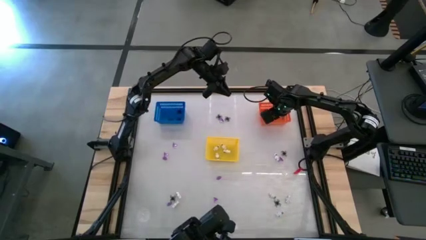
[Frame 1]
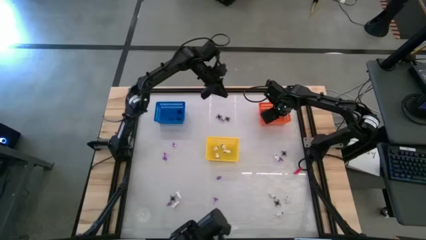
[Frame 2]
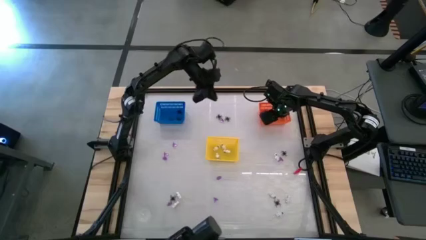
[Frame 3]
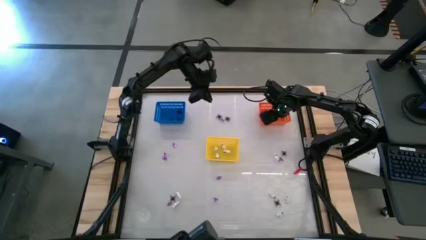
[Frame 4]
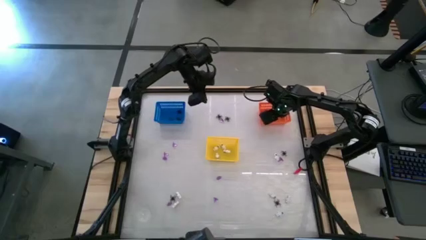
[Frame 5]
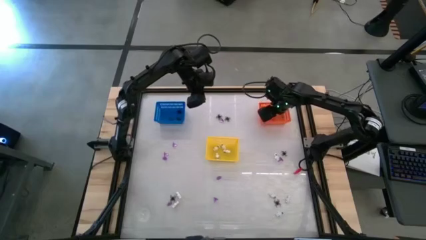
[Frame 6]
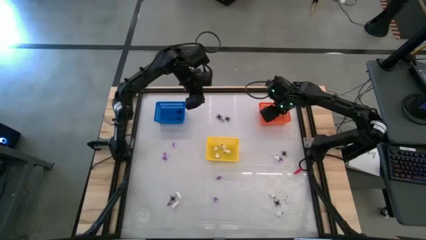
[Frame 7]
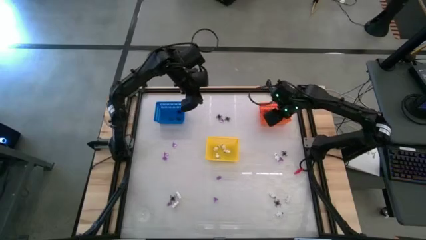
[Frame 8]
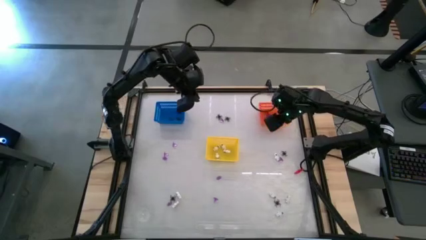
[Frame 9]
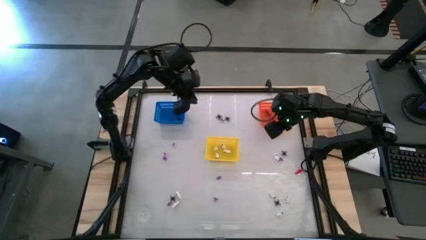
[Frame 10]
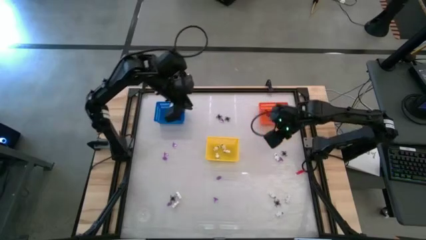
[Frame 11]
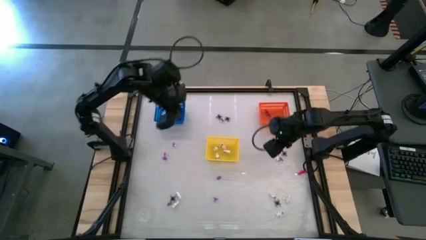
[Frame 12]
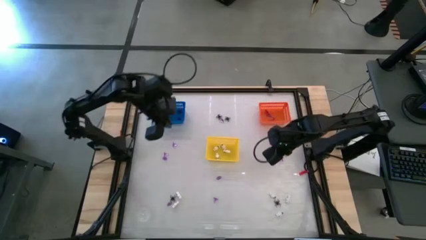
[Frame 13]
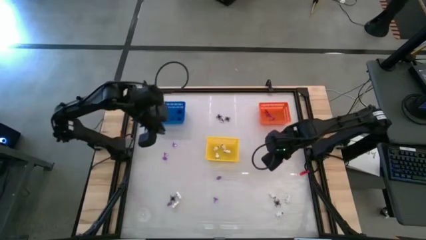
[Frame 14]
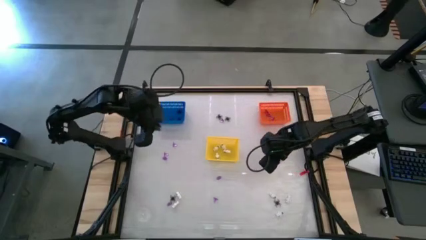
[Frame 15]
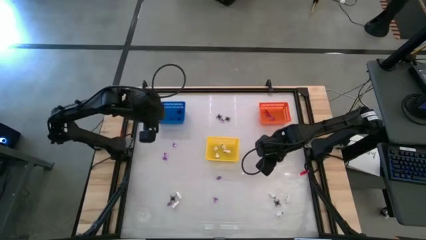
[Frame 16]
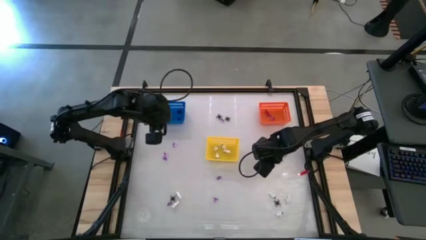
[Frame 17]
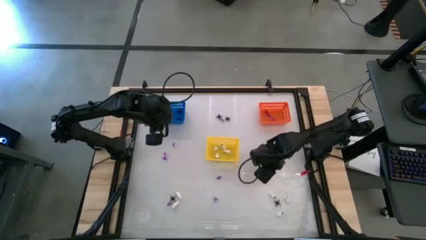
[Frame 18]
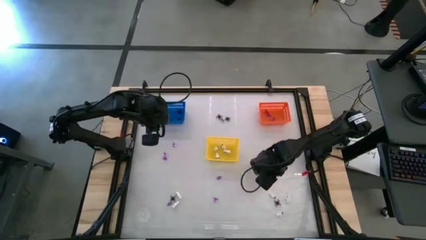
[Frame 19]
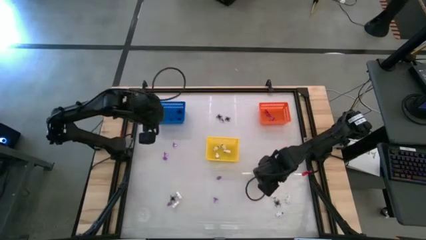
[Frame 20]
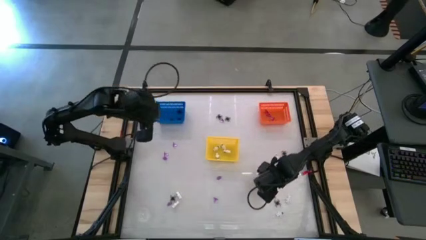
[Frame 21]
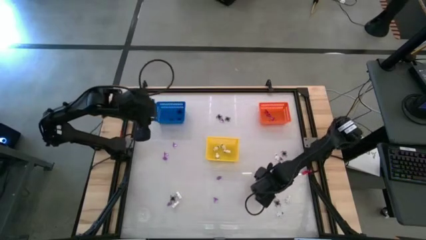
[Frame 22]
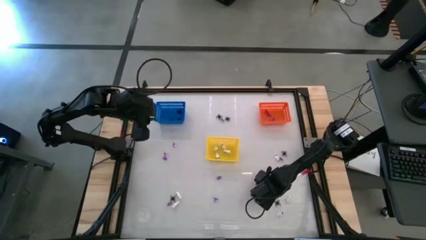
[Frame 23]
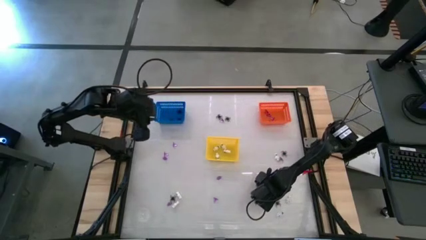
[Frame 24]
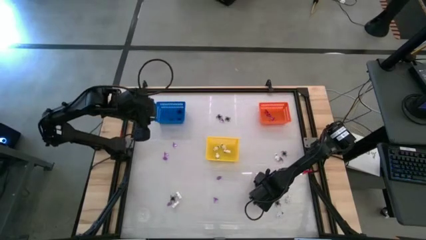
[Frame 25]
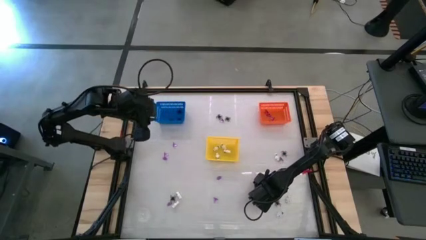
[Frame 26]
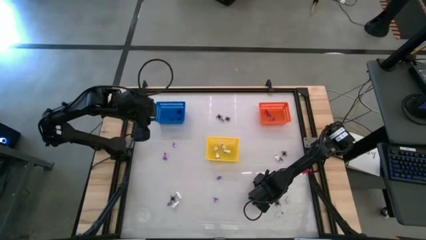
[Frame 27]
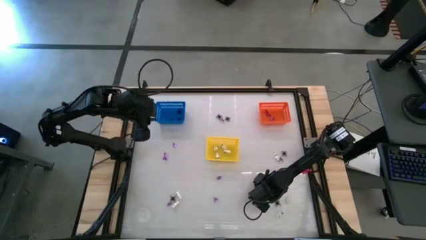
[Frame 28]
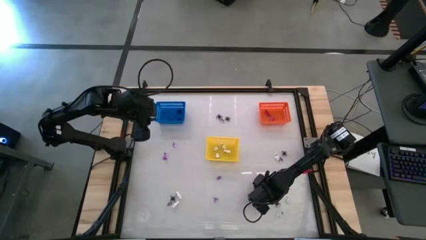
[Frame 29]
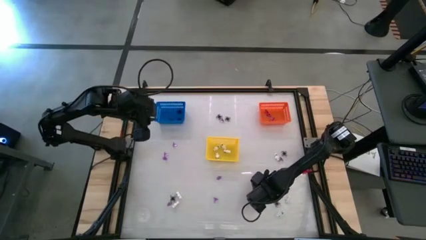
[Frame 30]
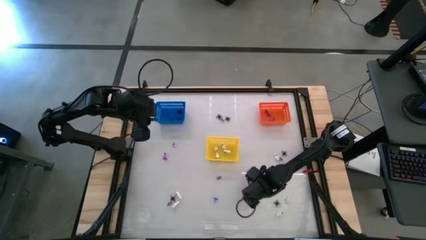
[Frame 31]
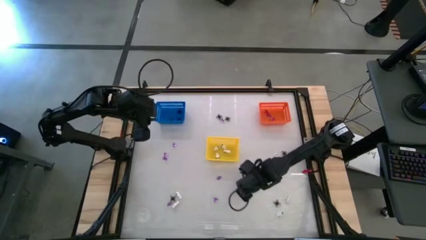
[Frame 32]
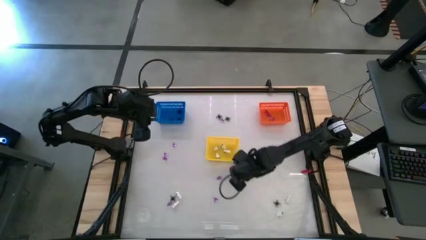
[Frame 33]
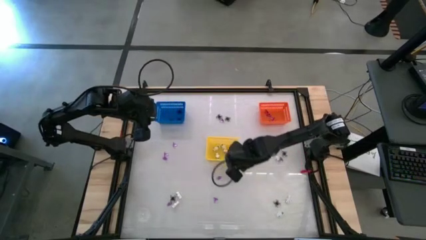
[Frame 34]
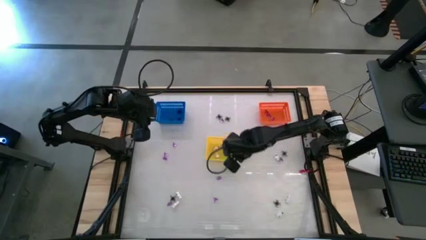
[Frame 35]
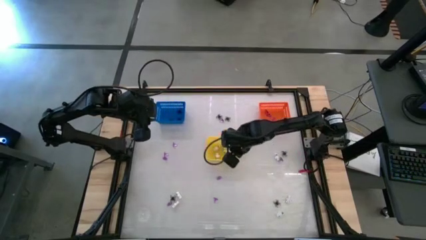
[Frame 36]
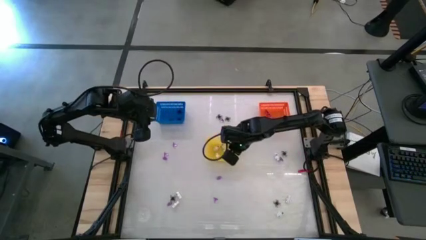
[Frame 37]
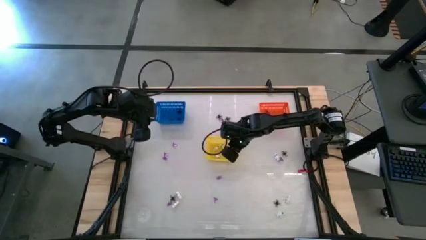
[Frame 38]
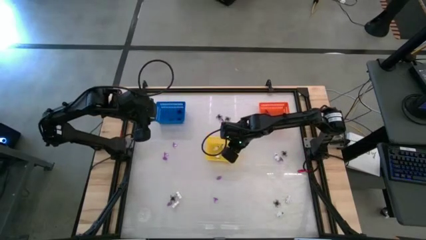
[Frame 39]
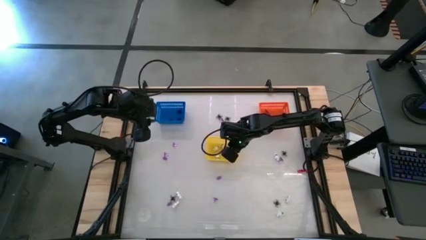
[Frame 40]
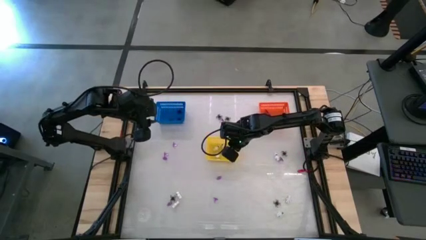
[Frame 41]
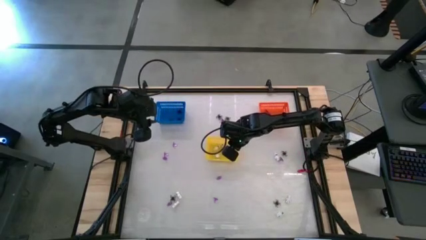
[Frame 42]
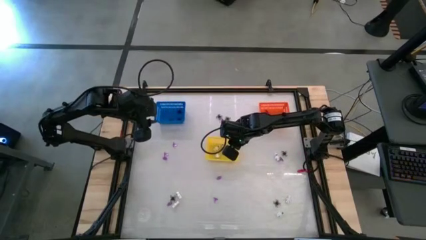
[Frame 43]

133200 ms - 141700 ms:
Task: Sort Halloween decoration
Put the white skeleton toy into the yellow bin

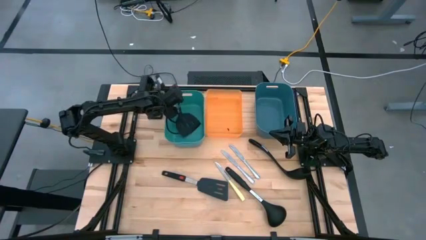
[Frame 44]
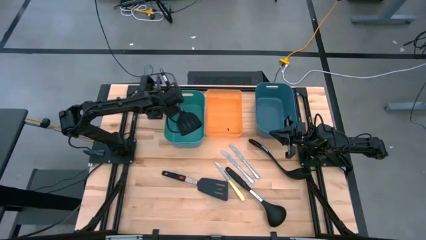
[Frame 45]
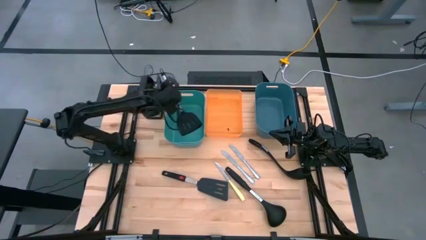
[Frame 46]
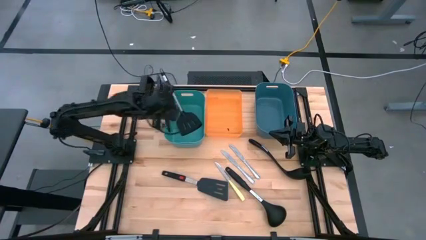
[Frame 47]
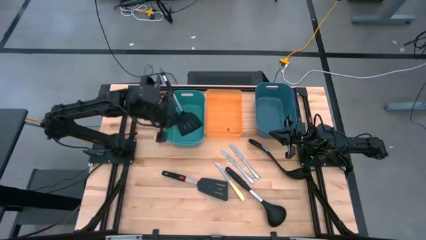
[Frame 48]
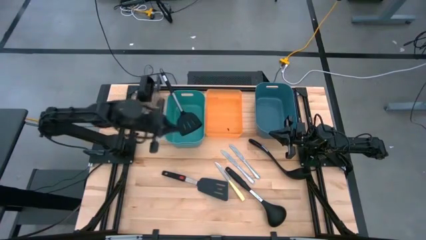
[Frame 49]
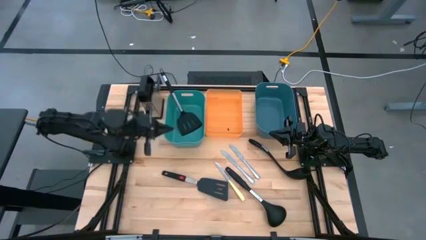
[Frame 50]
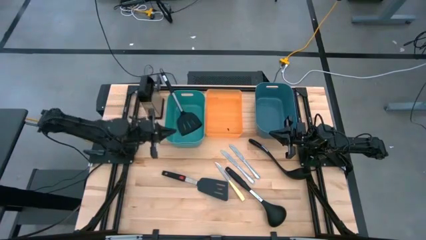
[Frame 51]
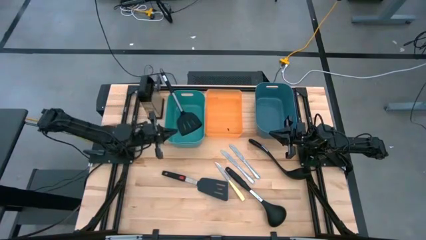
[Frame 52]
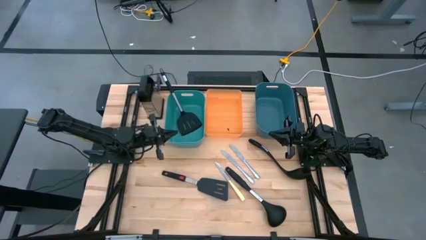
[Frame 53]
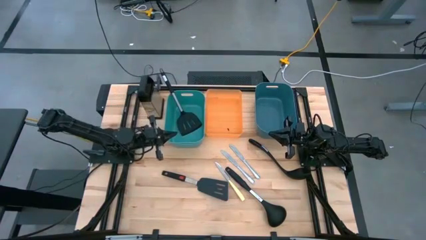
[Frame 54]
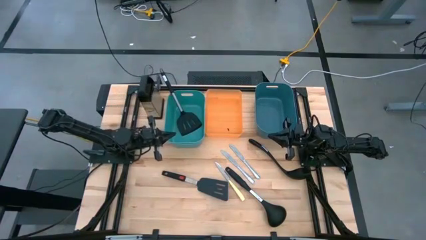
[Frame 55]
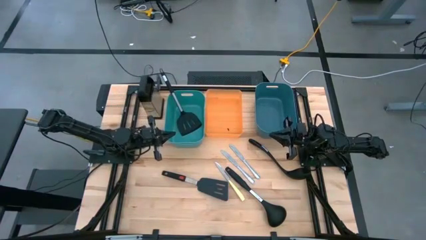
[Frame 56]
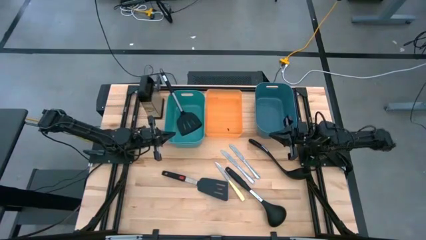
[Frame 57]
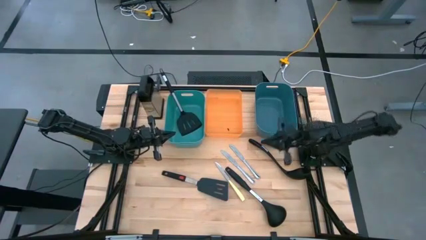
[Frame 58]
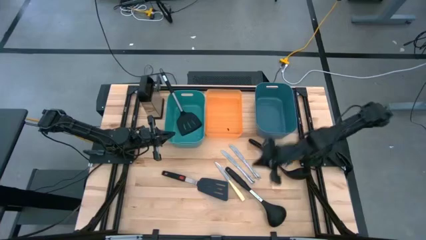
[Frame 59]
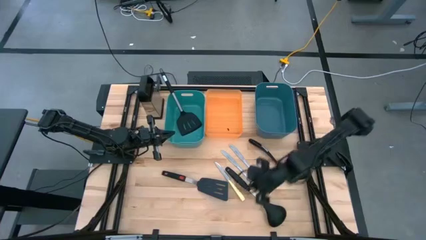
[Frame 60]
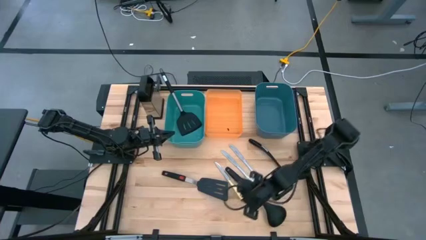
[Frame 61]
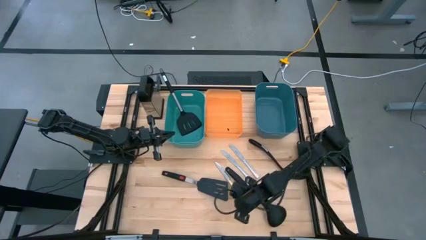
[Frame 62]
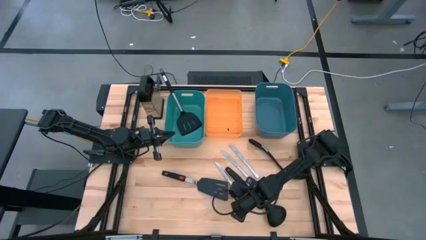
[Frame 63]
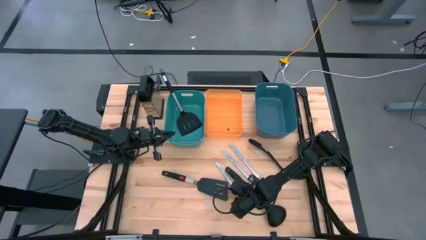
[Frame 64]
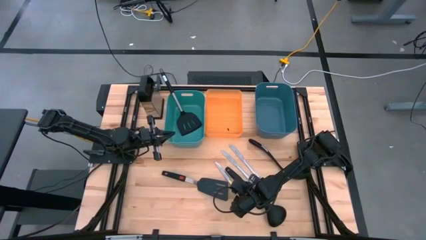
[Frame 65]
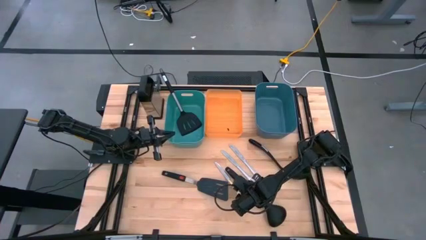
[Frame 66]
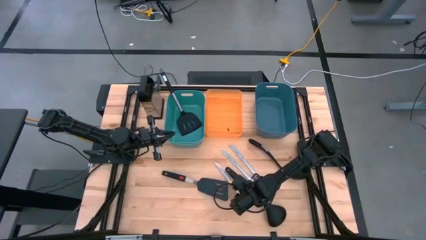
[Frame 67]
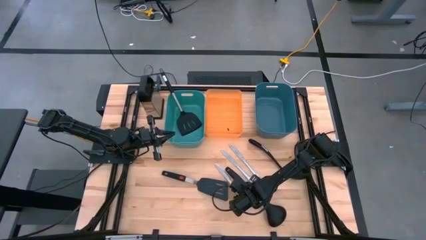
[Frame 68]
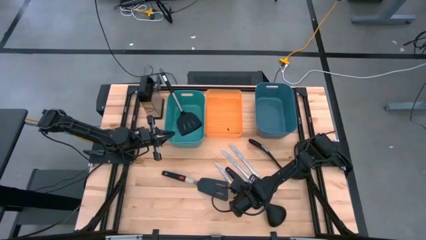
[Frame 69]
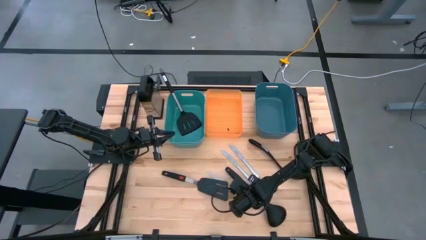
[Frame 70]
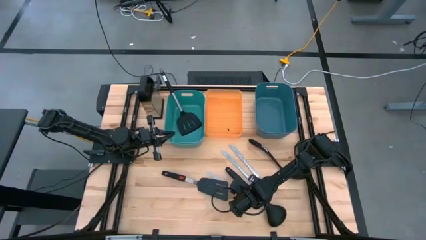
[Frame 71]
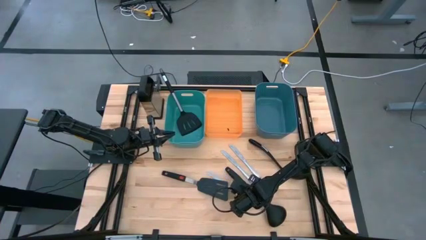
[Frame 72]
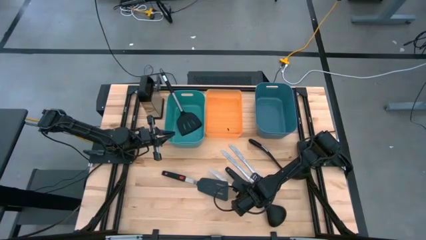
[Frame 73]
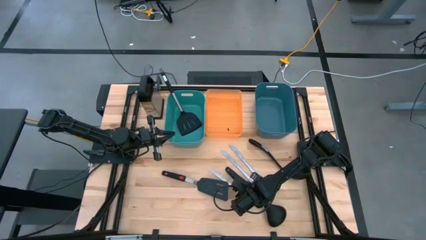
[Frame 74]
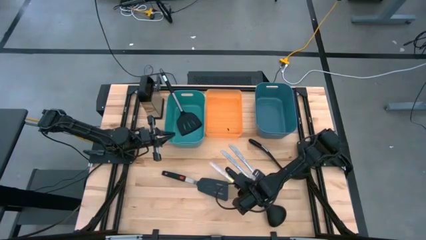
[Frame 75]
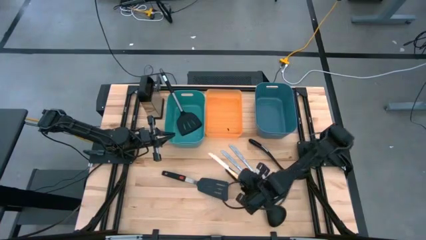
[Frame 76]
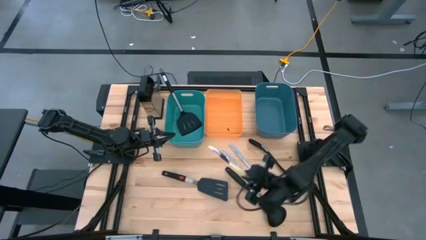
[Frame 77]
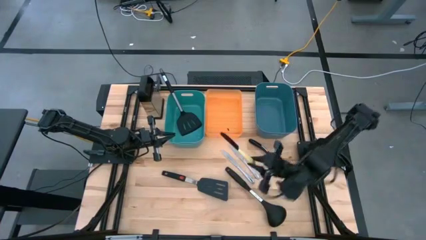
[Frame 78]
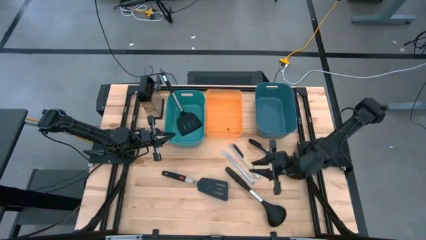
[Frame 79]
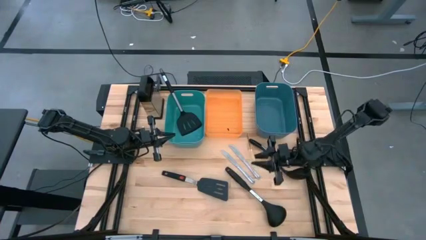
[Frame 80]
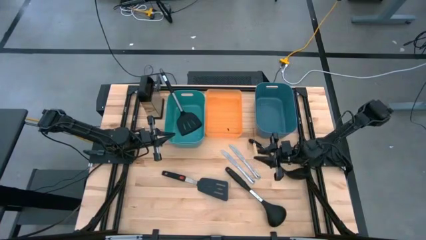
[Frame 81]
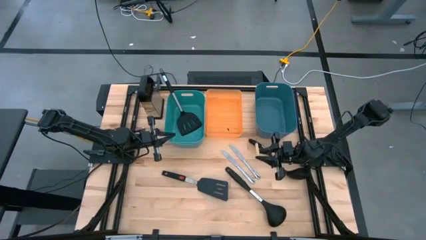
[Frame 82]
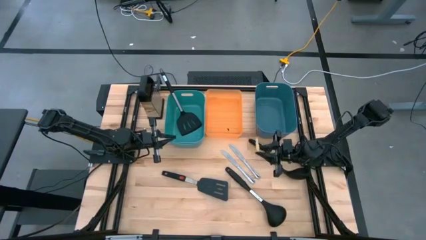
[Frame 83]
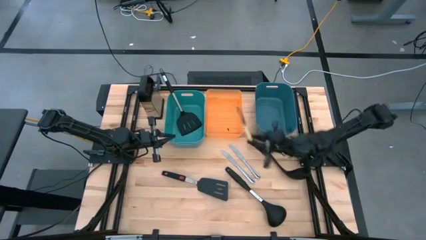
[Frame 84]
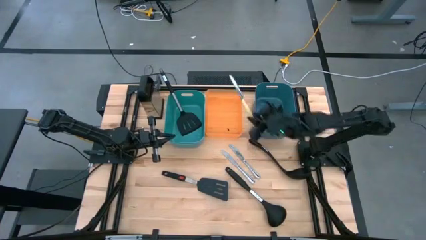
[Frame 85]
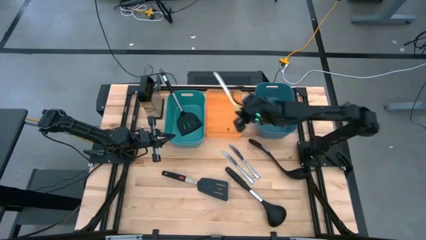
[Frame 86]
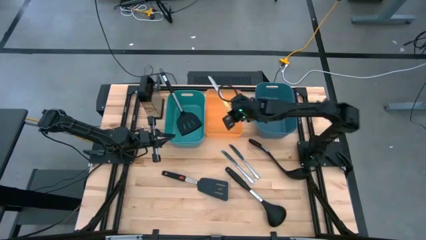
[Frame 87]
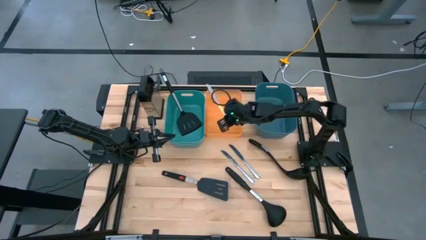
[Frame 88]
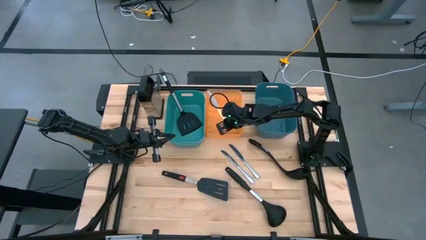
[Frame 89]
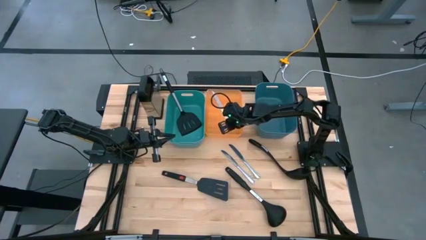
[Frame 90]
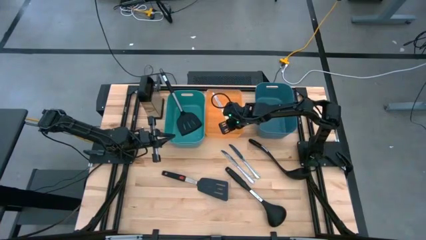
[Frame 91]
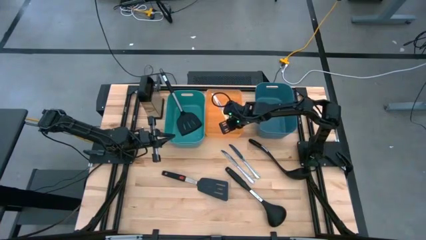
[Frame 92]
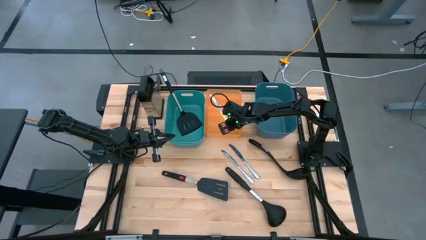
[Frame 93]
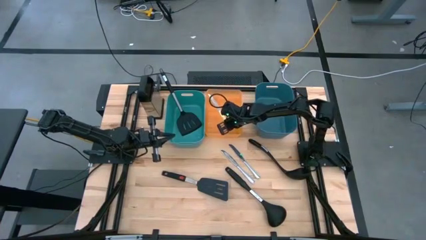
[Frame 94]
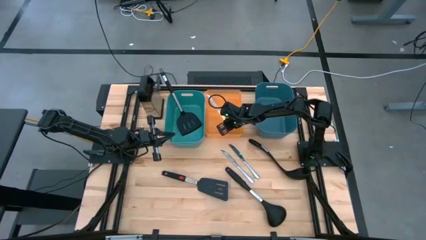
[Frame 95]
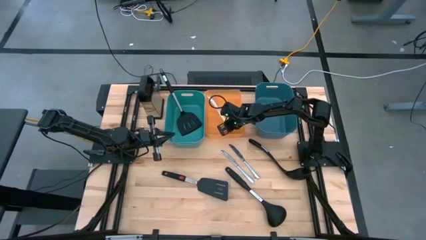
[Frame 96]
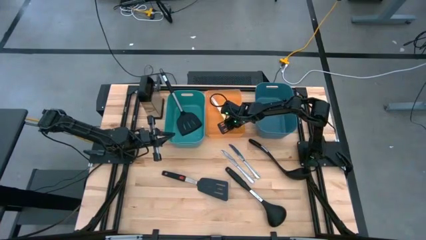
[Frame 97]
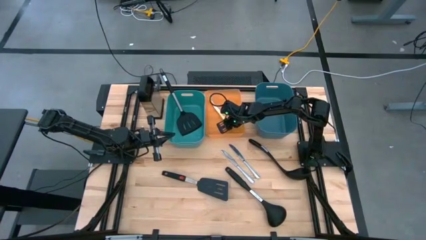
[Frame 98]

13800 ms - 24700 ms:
Task: Pick & Place Kitchen Items
Put the yellow knife into the orange bin
